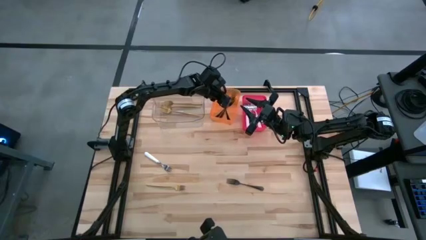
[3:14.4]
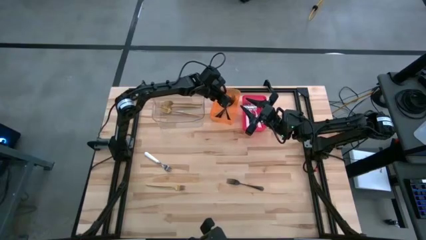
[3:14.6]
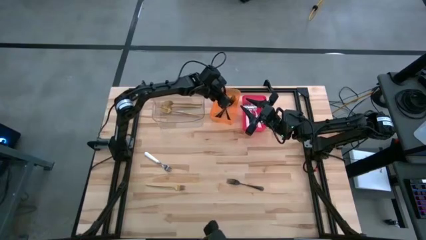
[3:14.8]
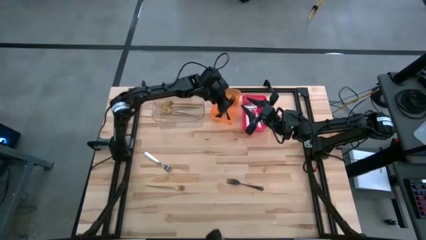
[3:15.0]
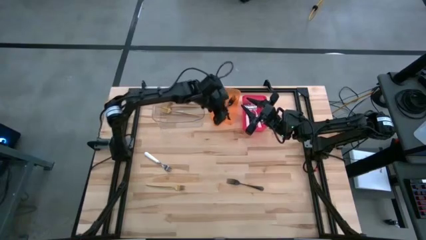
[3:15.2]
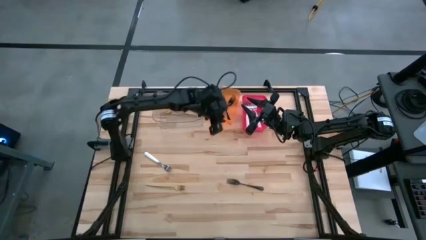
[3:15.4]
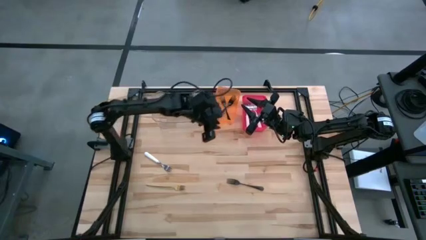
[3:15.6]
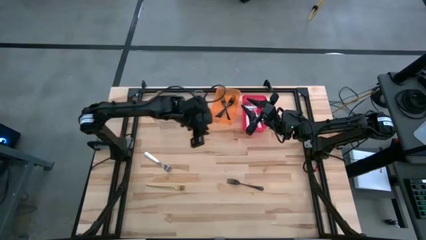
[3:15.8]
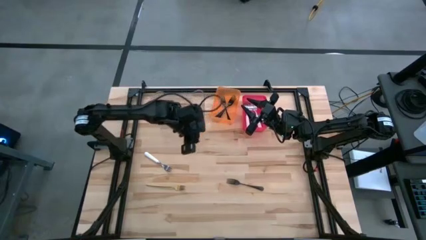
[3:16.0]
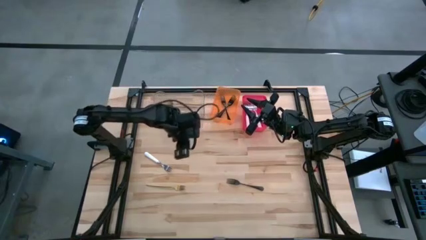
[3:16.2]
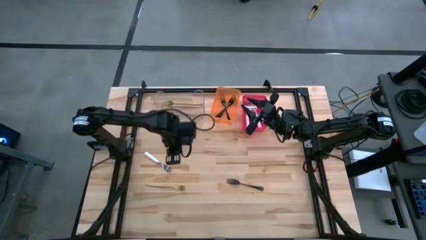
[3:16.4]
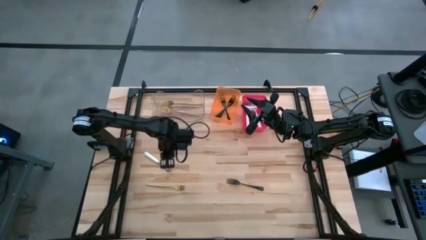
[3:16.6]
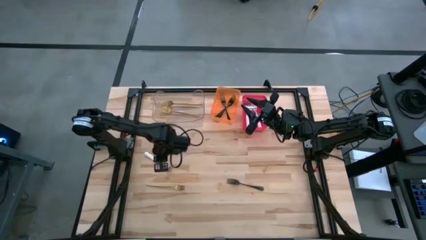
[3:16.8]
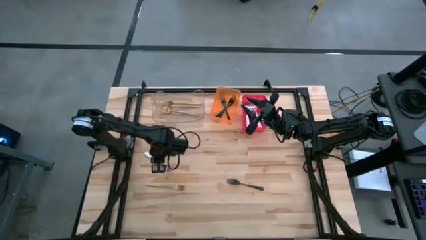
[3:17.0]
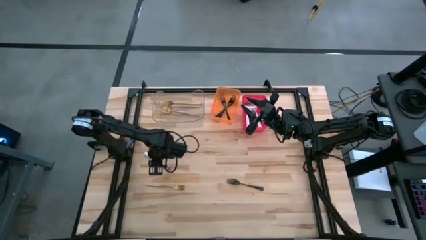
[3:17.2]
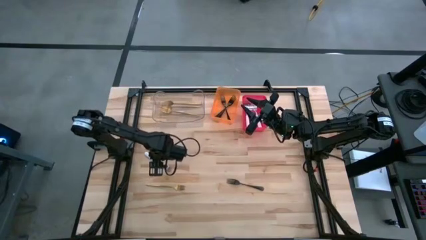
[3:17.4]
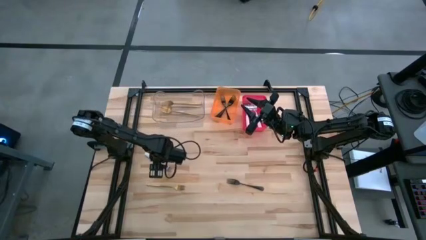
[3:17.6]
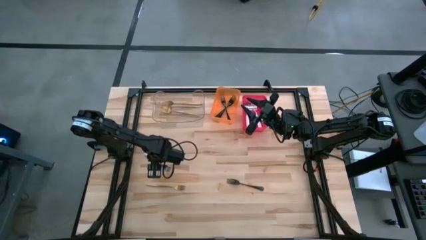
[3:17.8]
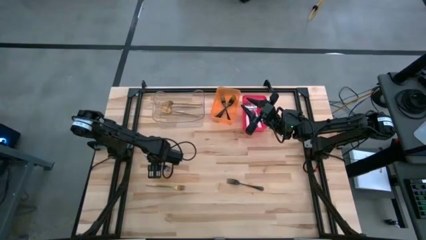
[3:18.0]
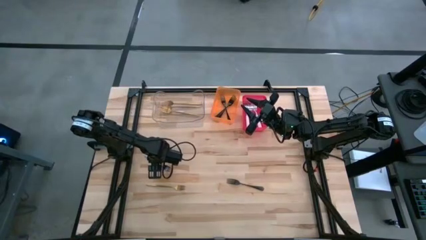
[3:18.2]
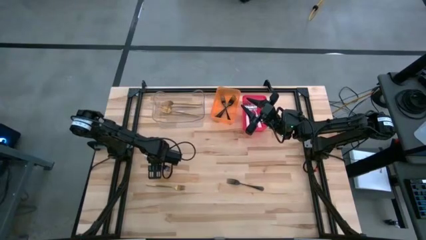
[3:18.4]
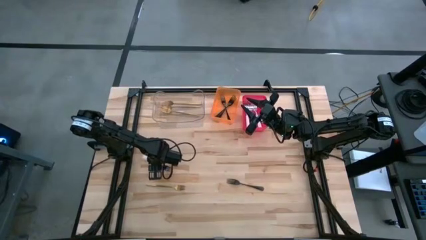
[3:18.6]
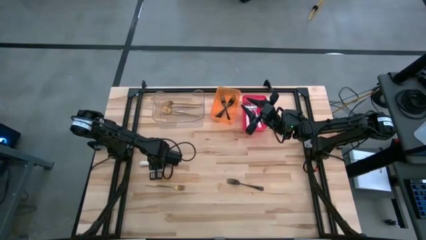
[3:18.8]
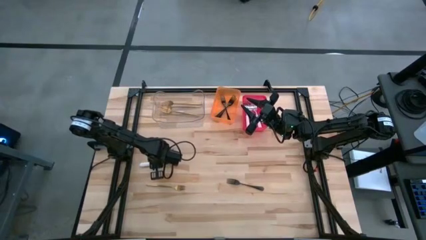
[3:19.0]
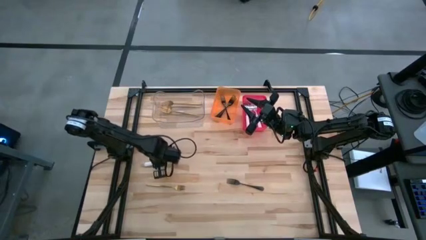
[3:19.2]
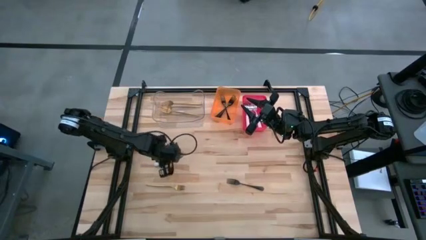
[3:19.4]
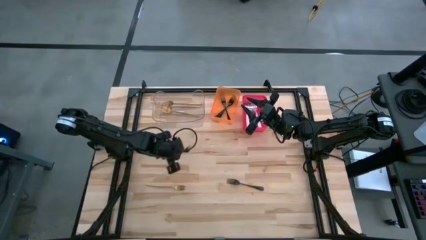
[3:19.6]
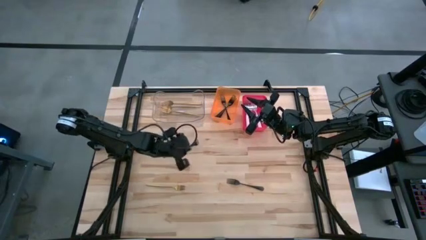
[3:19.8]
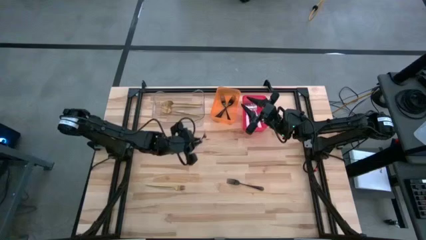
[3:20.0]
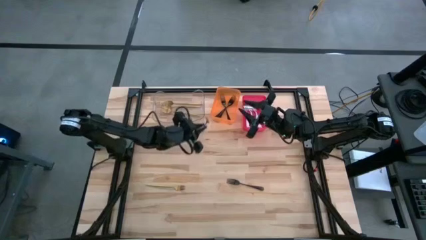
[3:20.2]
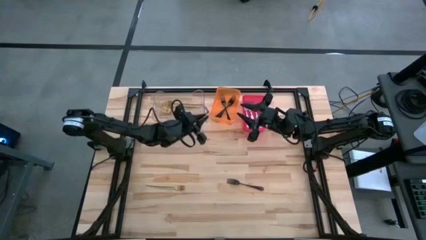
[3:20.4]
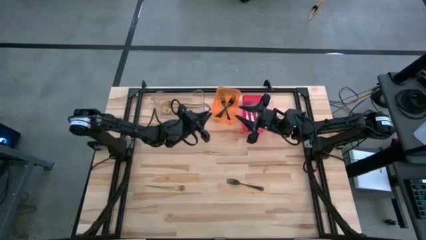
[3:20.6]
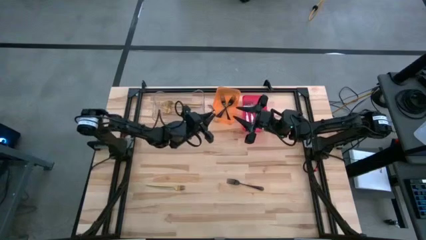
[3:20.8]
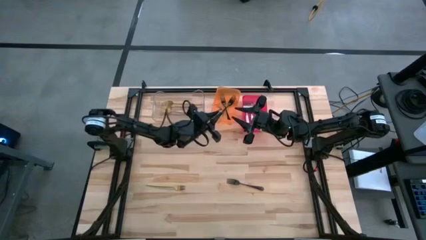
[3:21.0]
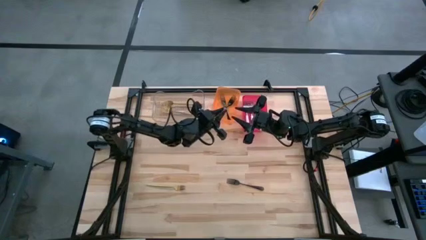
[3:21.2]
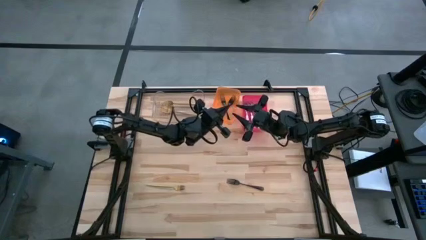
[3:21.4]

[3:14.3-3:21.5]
Task: Sort silverware by color (type)
Put the white fork into the red bin

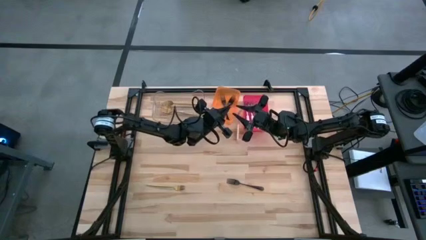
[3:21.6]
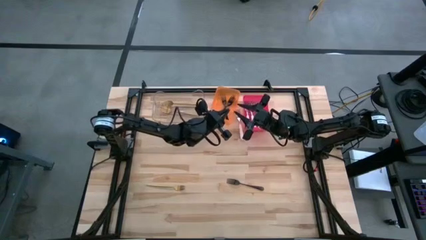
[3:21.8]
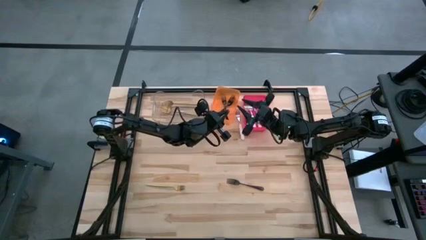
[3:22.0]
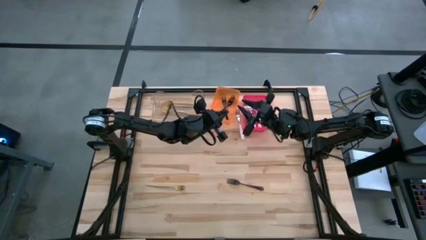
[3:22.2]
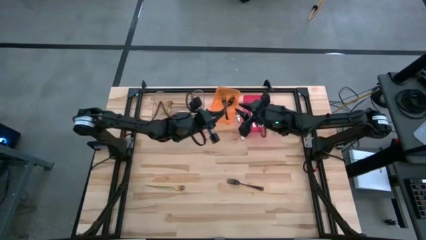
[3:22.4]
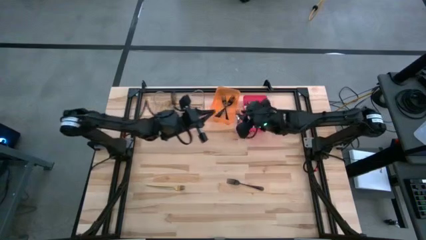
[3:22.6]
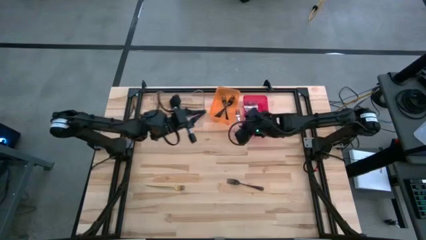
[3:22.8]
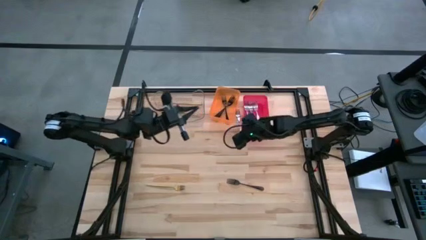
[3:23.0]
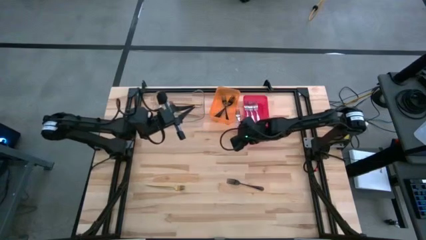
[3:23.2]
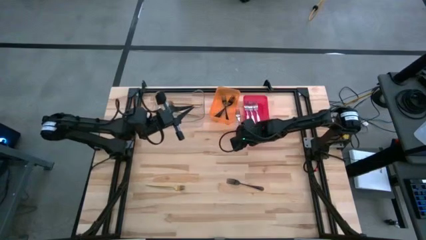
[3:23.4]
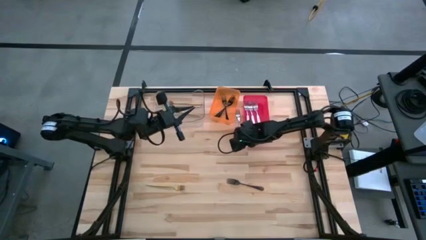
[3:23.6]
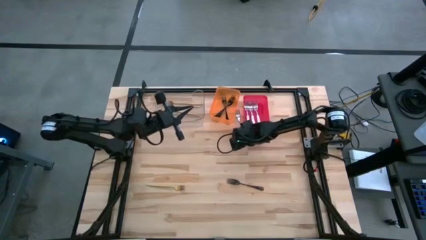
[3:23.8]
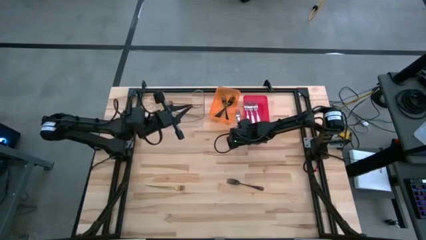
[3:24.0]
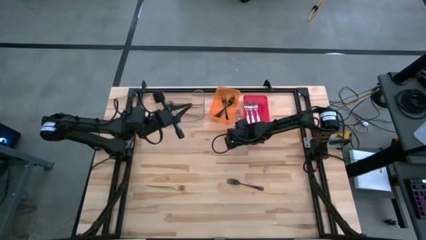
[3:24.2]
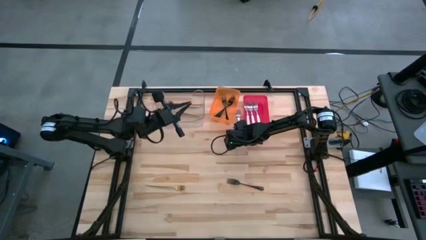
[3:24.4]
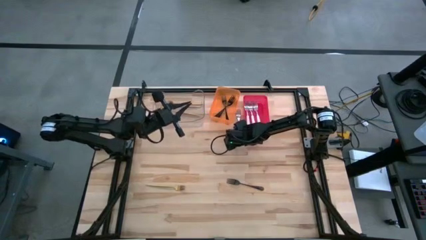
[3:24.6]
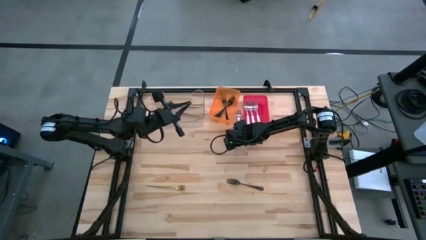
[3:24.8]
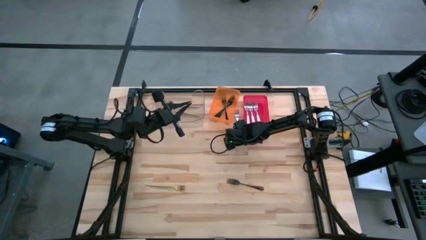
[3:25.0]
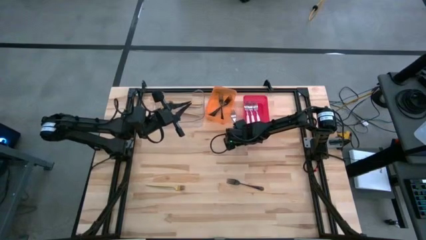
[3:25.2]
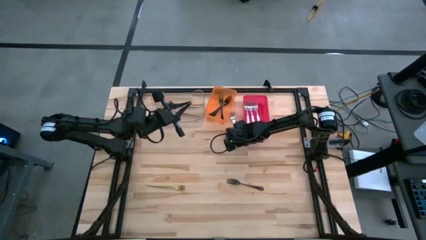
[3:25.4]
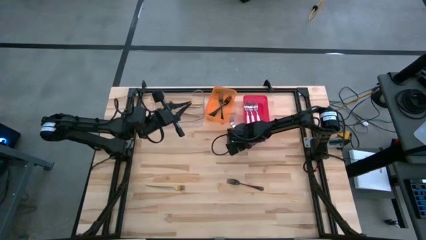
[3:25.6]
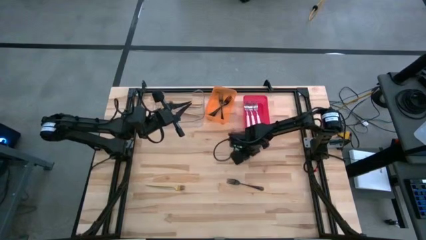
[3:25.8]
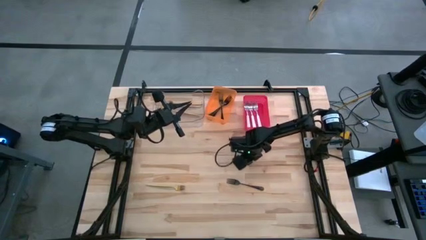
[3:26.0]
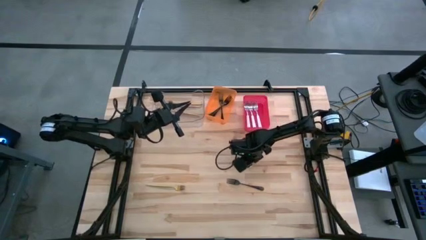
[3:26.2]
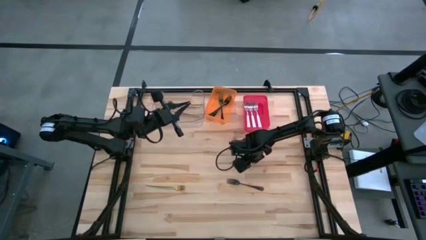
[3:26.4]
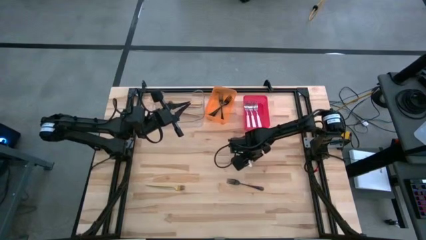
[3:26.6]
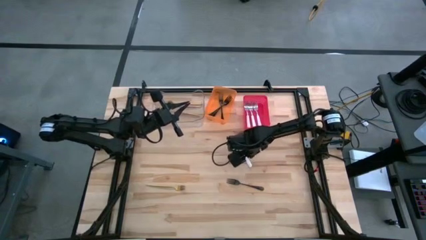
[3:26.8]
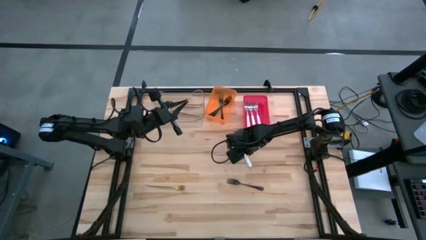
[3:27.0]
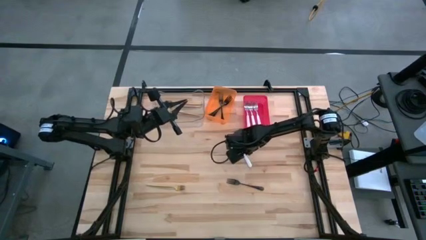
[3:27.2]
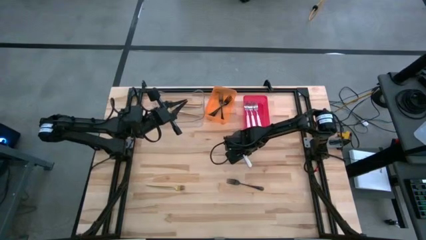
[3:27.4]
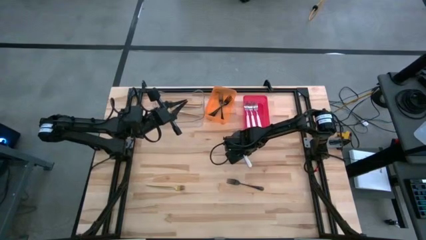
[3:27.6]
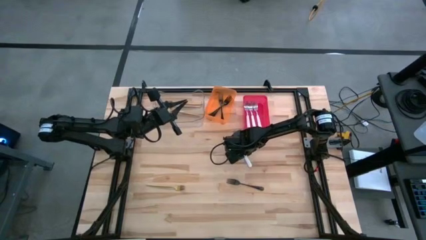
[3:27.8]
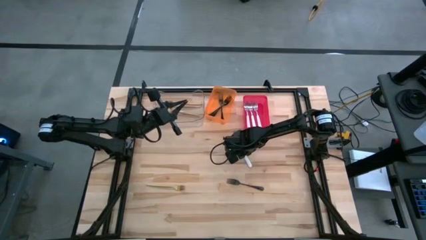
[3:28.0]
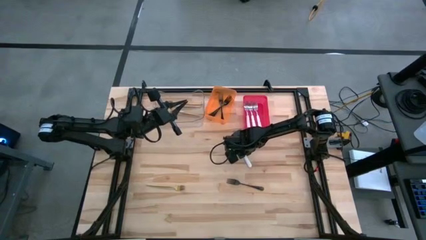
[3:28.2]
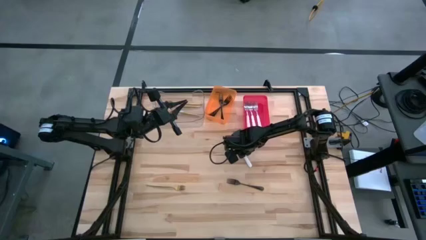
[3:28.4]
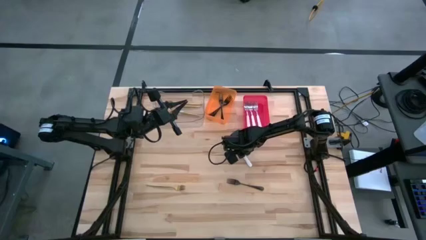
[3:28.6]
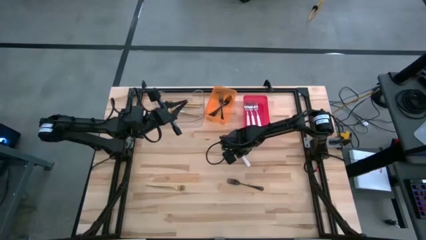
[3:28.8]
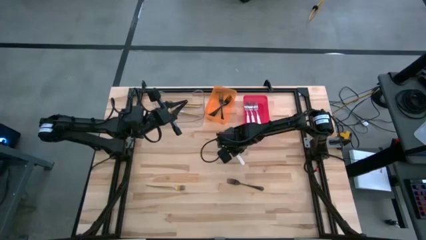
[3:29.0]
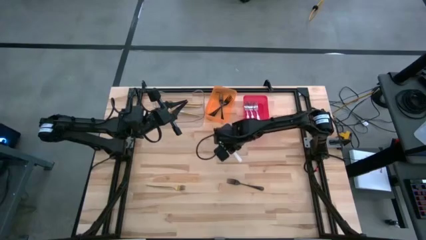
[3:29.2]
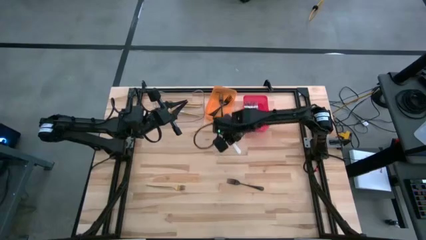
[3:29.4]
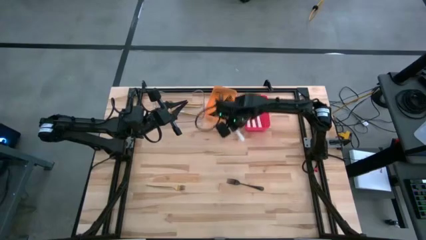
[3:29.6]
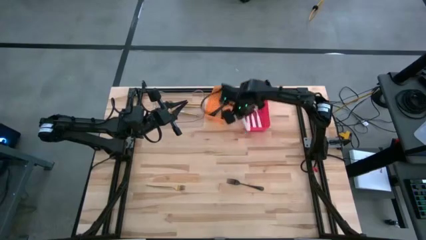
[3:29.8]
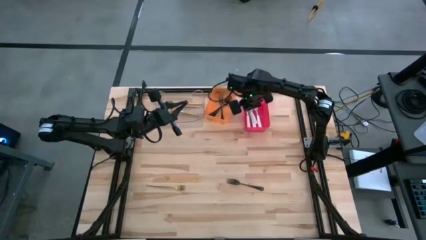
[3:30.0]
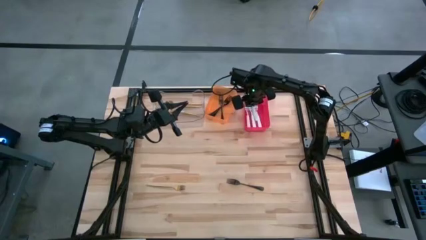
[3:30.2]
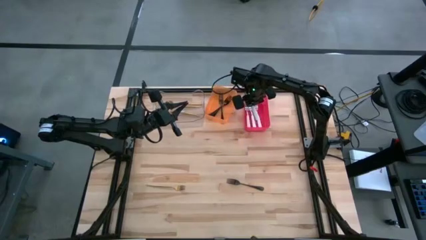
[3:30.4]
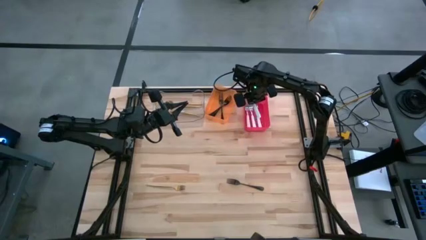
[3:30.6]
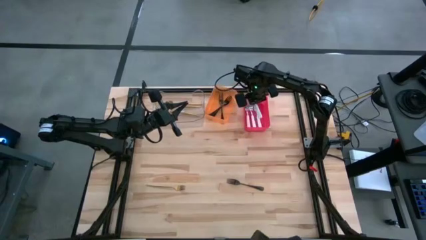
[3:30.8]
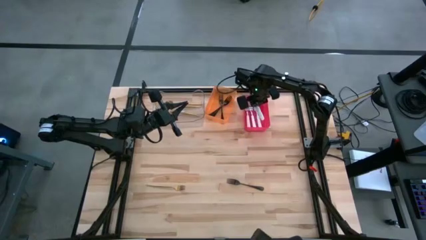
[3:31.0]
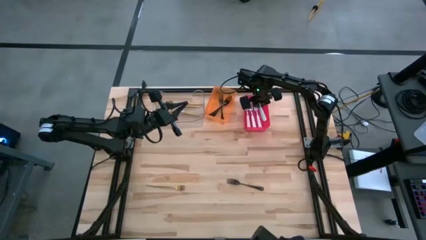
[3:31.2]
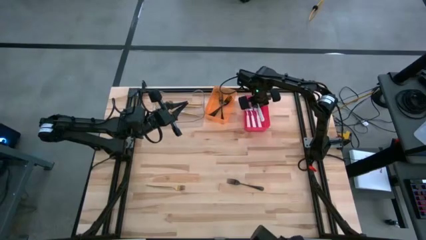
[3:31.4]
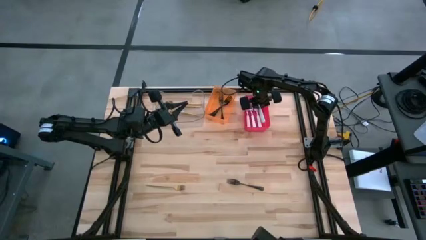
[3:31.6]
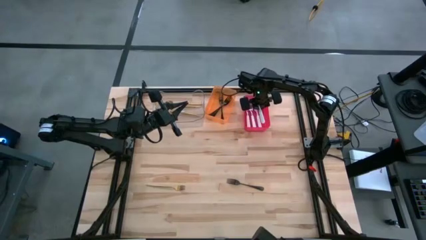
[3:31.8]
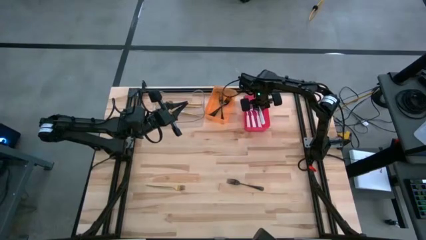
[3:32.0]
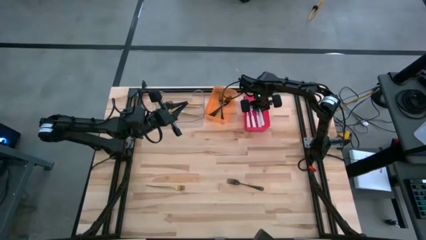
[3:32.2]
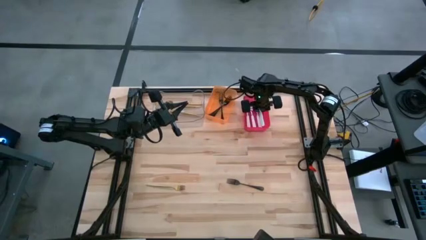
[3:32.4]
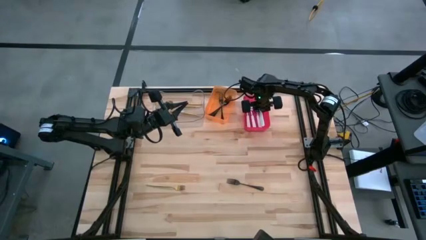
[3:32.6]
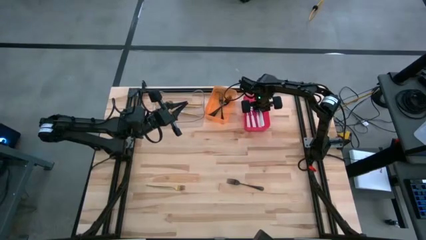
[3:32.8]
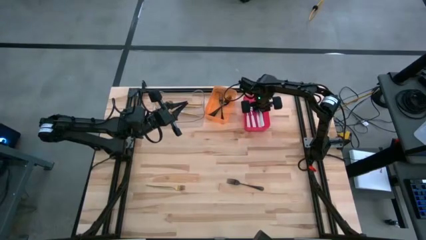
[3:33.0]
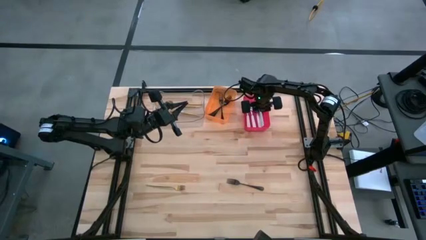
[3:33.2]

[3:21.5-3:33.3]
Put the white fork into the red bin
